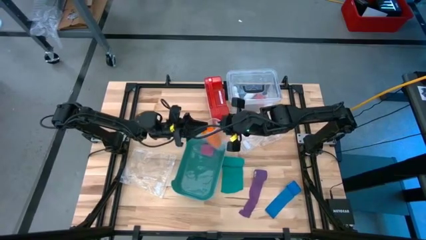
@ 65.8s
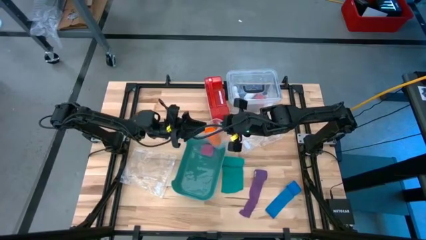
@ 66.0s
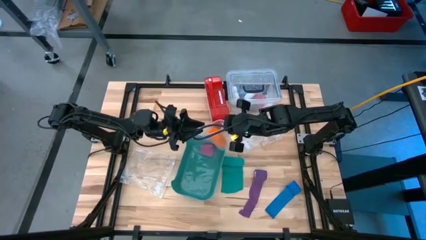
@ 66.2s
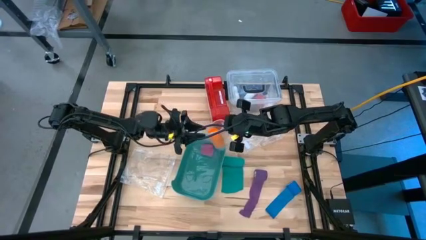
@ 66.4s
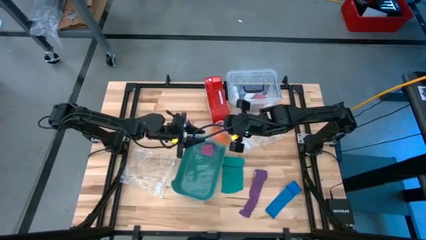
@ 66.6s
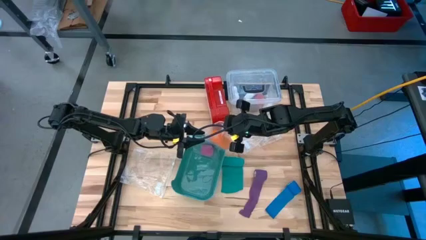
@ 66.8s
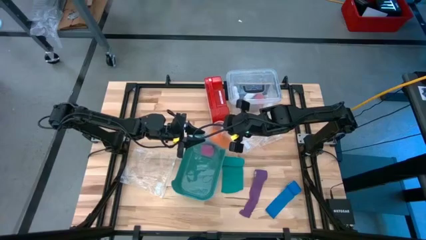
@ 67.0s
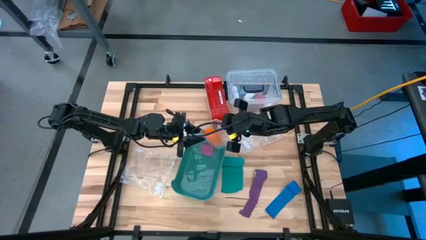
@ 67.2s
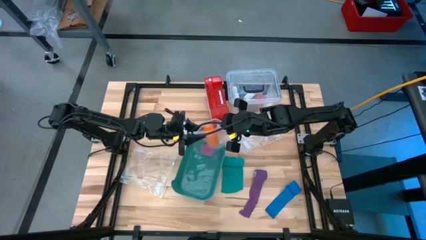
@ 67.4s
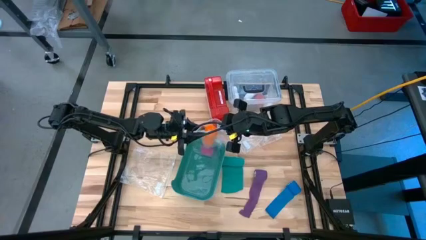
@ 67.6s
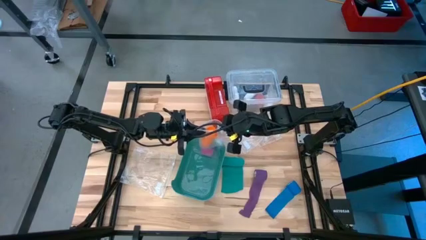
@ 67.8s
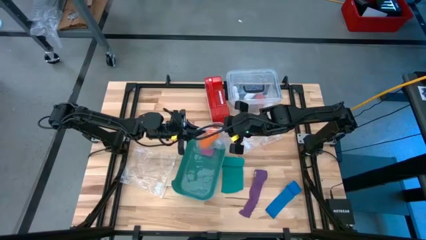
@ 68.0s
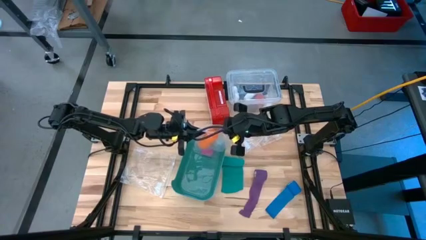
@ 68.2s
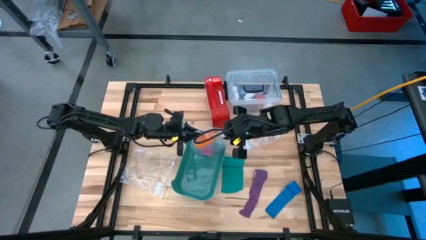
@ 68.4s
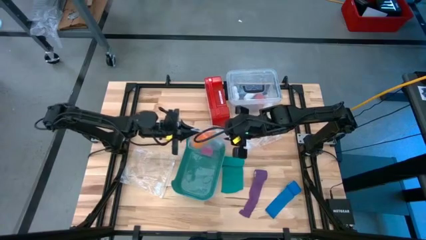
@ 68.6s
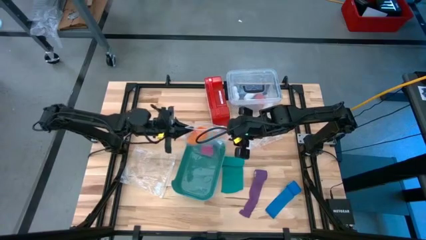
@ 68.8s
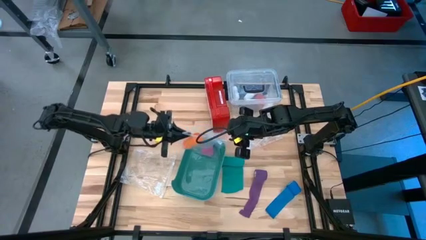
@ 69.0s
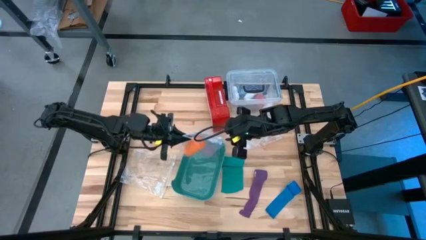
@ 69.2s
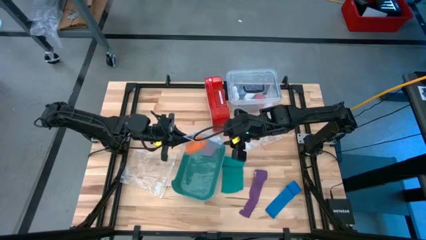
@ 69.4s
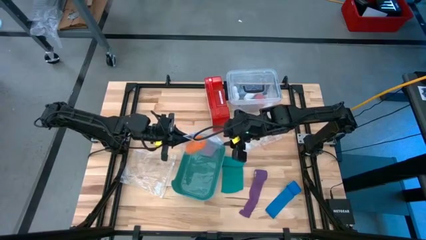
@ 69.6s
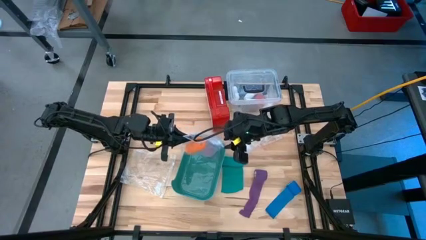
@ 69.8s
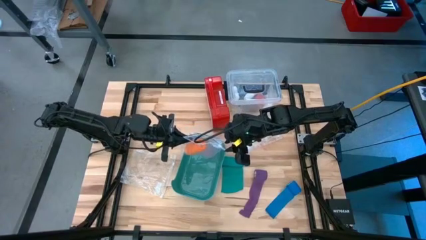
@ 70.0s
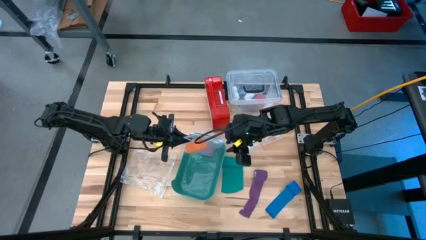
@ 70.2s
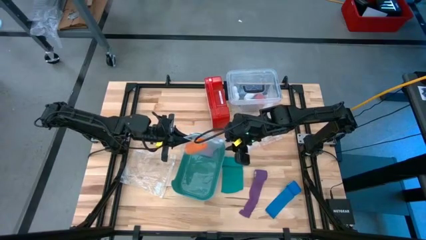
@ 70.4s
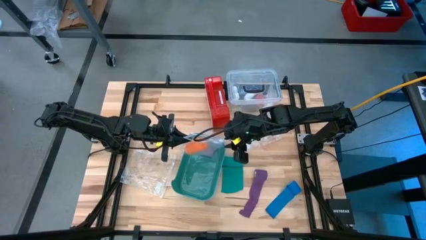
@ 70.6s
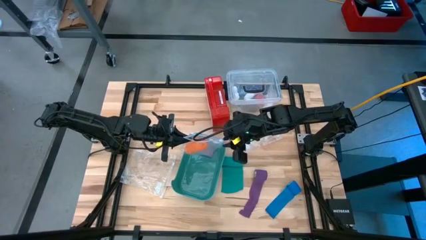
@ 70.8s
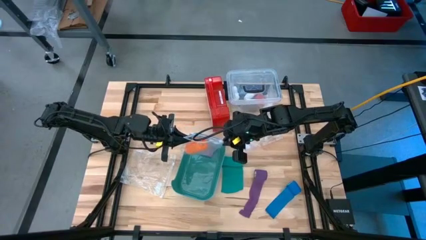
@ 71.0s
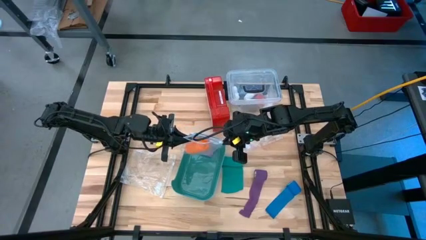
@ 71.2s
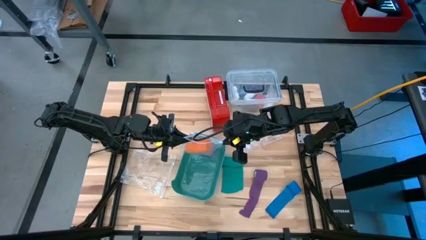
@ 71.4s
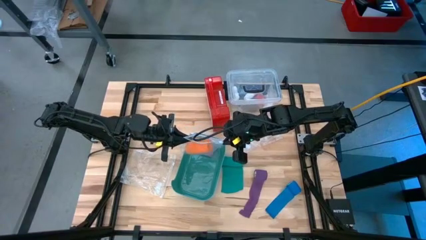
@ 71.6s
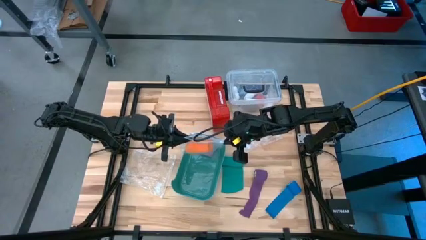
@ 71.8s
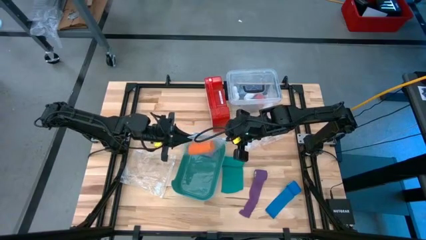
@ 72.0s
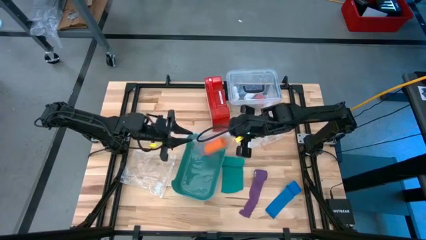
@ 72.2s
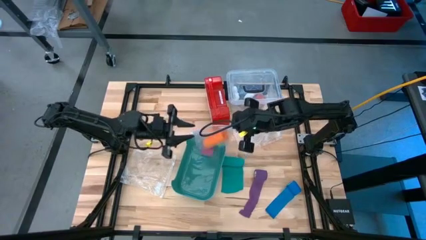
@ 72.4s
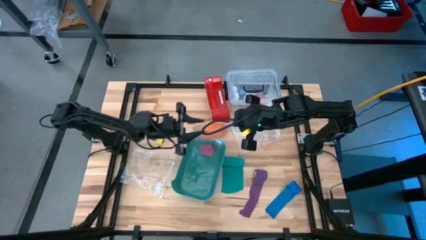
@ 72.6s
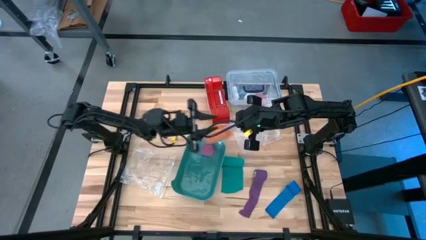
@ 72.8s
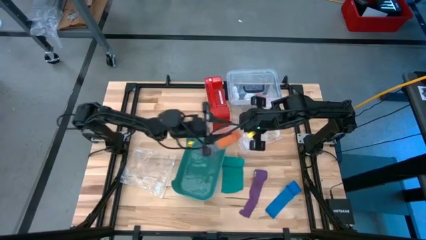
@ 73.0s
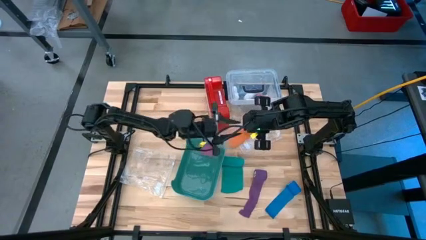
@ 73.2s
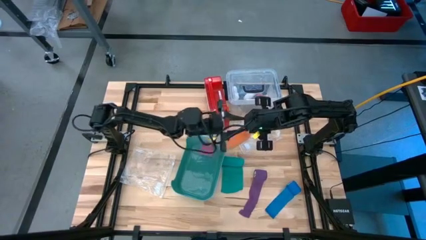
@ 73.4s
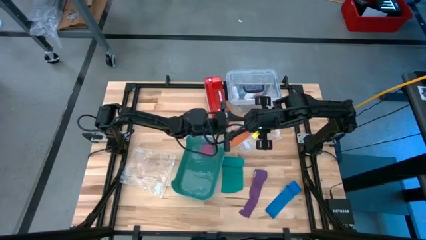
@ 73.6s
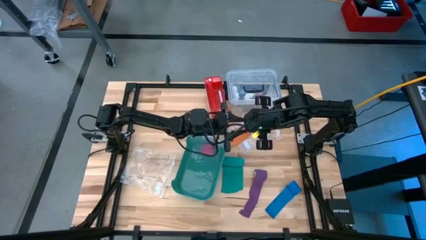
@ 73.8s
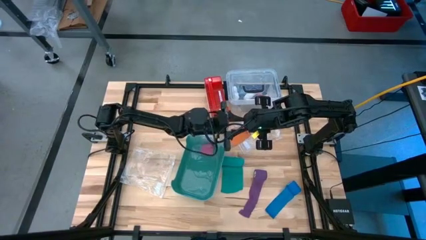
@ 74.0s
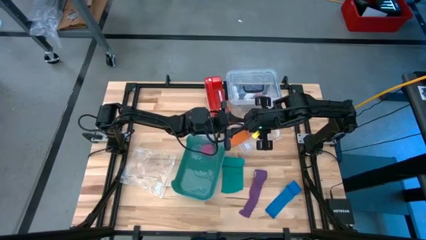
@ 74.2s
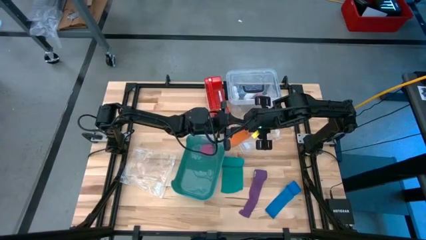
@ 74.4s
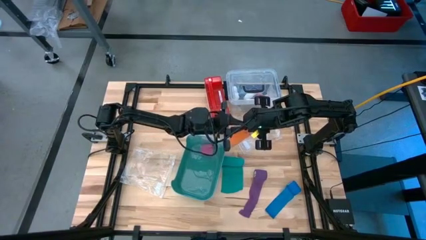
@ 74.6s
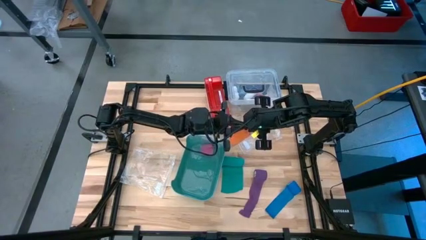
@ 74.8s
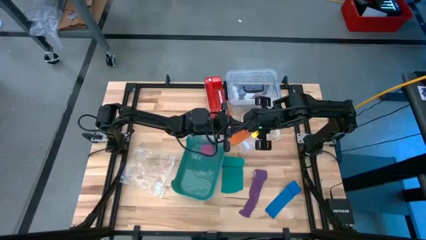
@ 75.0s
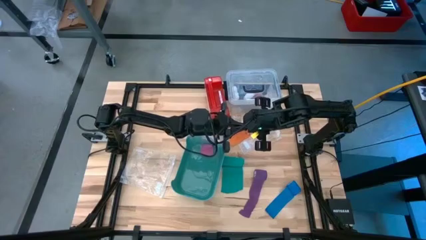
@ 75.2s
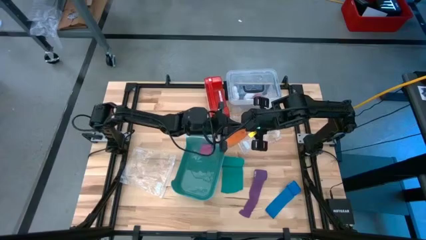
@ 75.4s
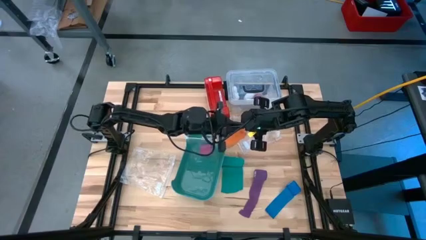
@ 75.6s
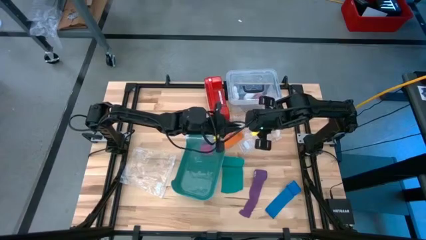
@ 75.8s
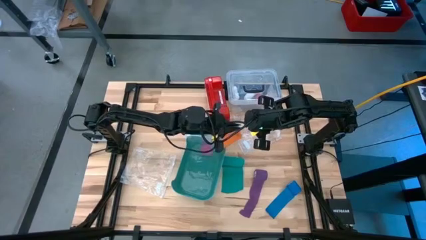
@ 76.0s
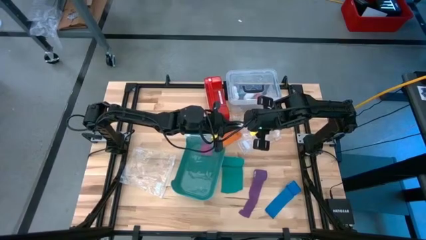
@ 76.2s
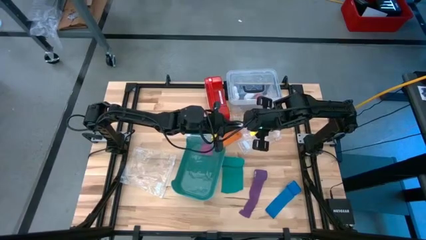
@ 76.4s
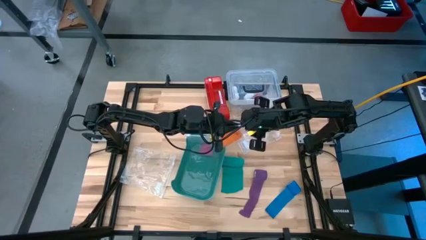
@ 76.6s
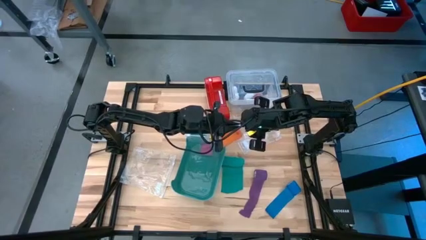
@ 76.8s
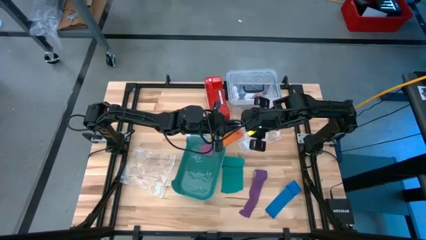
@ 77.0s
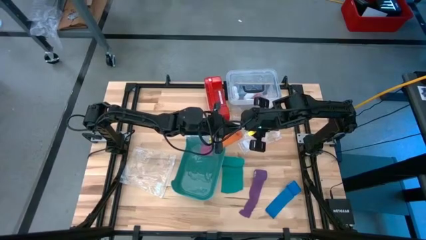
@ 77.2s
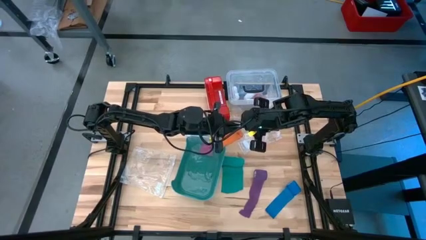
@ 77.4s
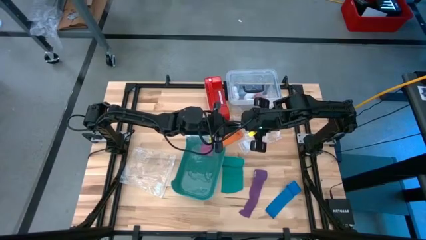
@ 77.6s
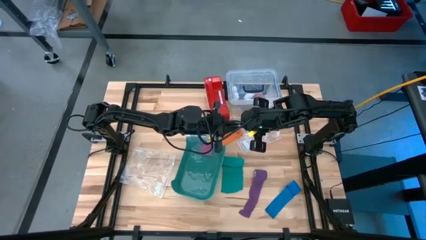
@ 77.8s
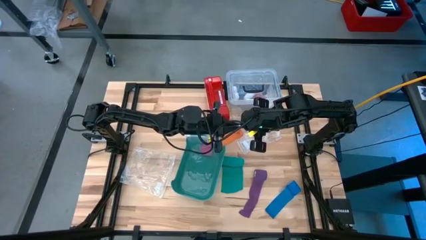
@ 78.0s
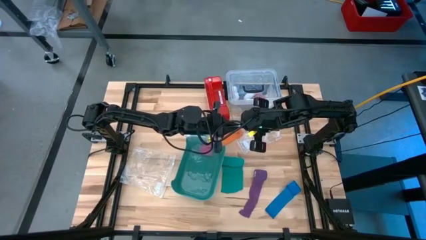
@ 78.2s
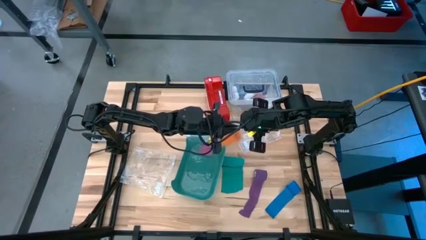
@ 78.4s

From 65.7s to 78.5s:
Task: Roll bandage
Close the transparent zip bag

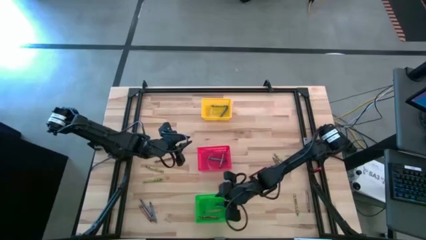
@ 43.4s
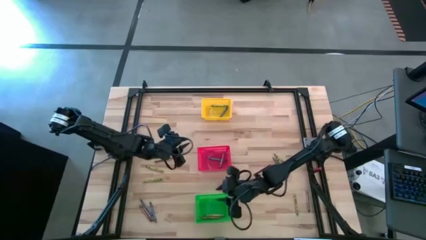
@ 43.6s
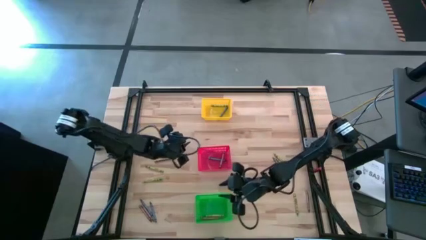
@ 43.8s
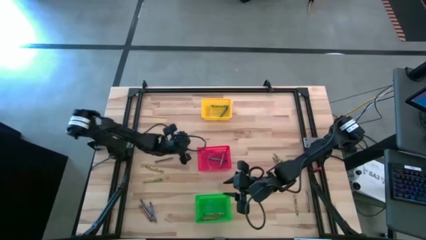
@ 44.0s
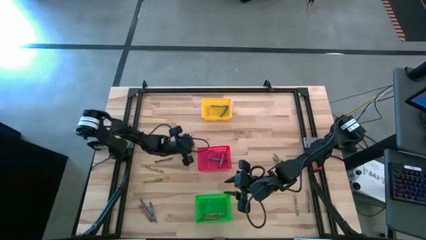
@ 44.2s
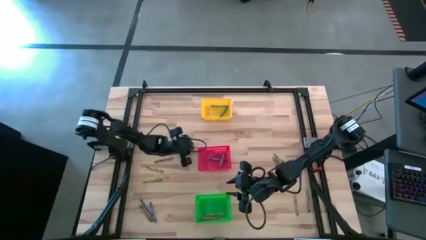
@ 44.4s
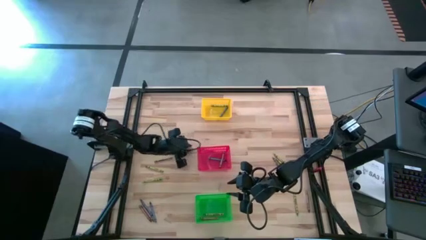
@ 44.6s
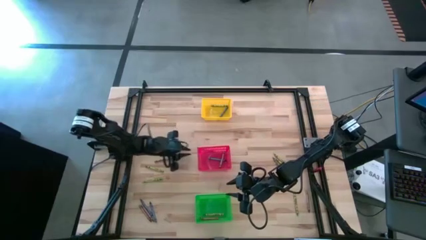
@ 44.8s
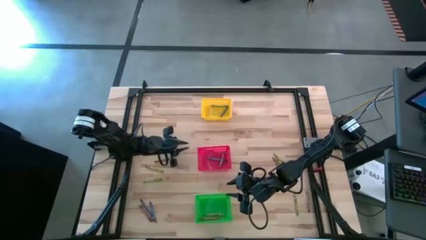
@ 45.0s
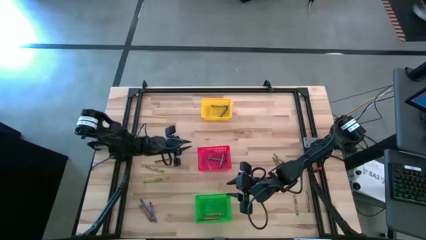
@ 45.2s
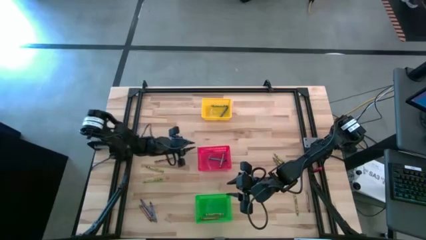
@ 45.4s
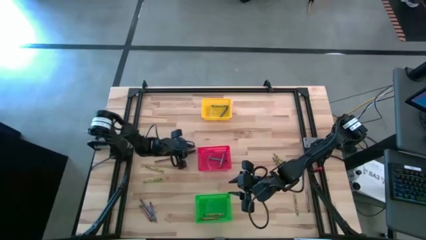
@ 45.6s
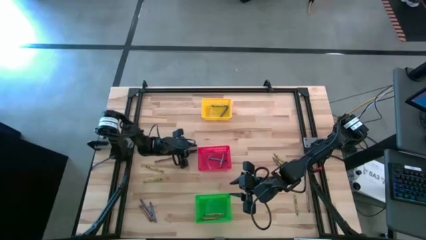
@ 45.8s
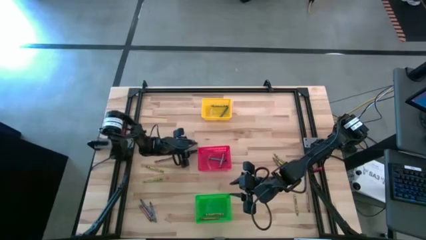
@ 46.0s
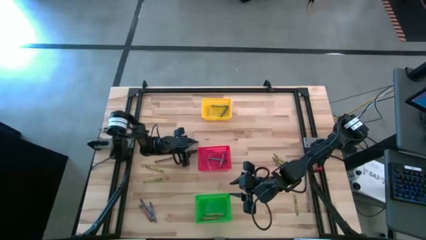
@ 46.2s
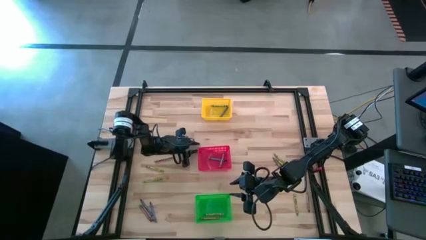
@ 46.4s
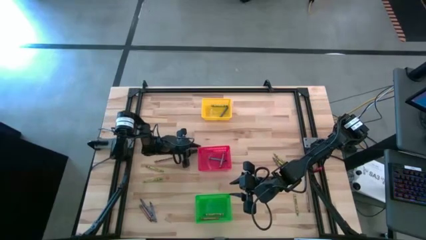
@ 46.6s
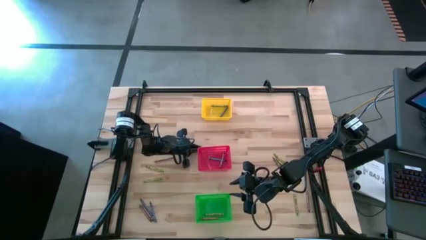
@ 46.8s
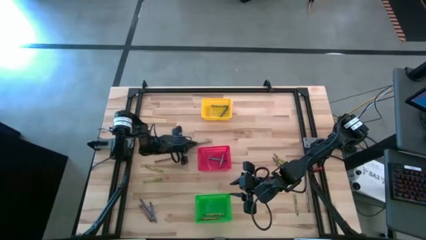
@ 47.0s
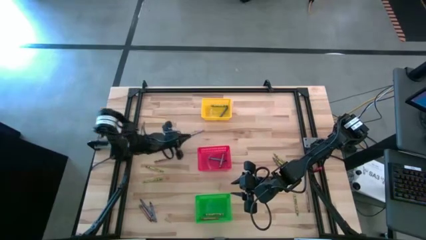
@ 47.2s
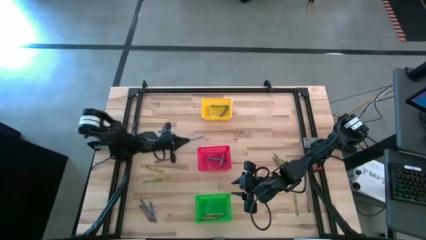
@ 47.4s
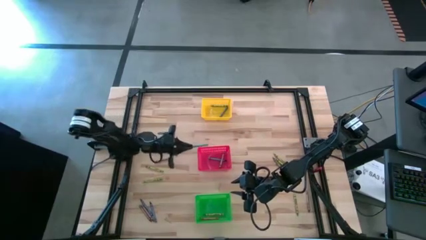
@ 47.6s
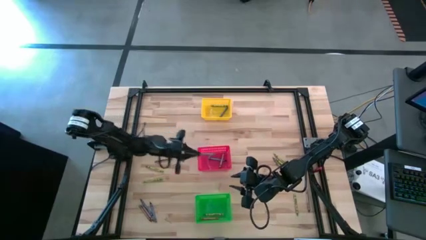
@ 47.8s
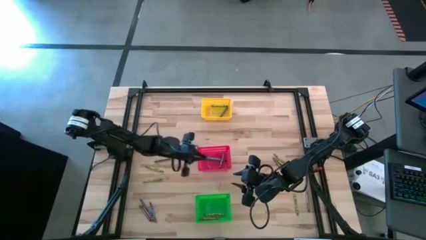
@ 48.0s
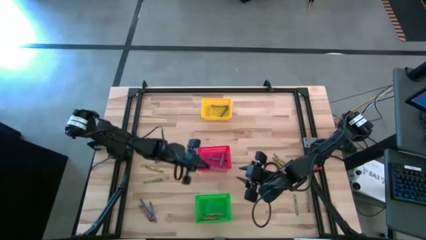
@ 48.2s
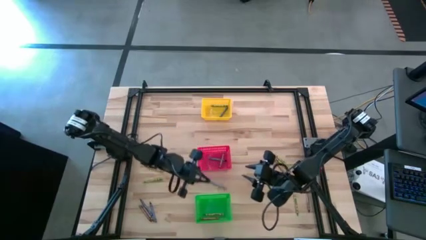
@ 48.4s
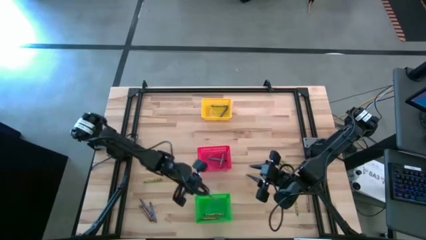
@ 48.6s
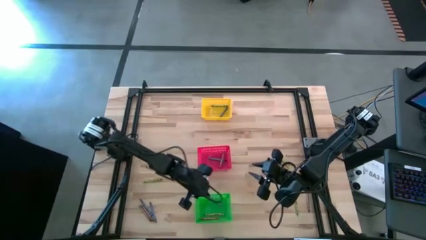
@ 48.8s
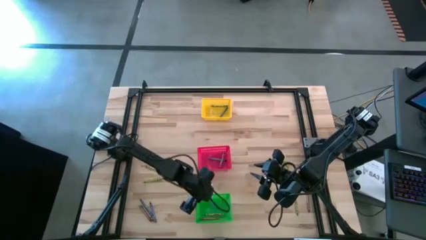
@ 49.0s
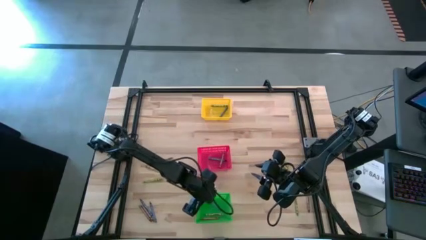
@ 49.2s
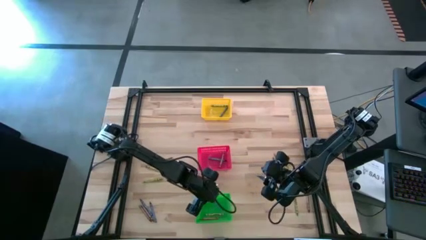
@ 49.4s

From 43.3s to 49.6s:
Task: Sort crayons
Put the blue crayon into the green bin
